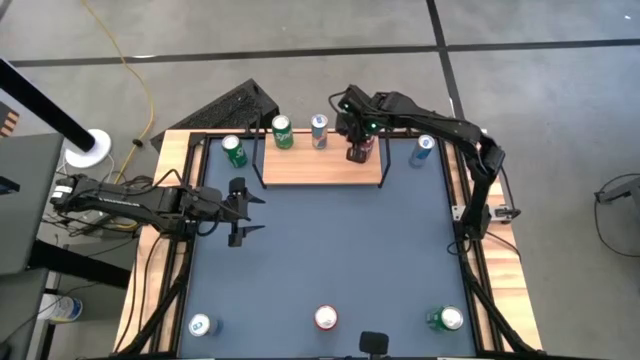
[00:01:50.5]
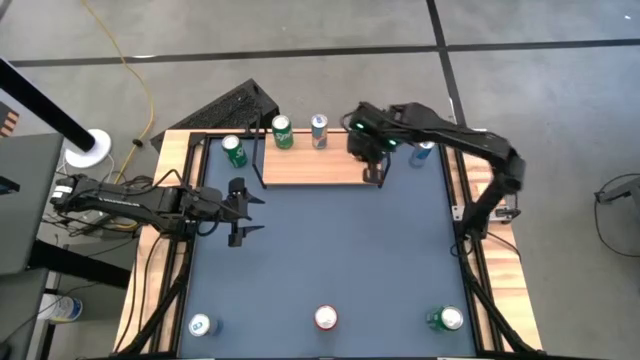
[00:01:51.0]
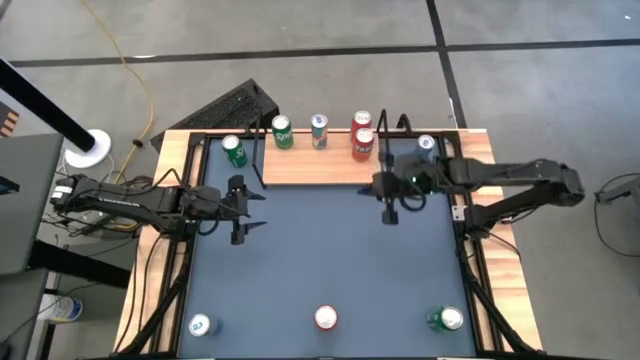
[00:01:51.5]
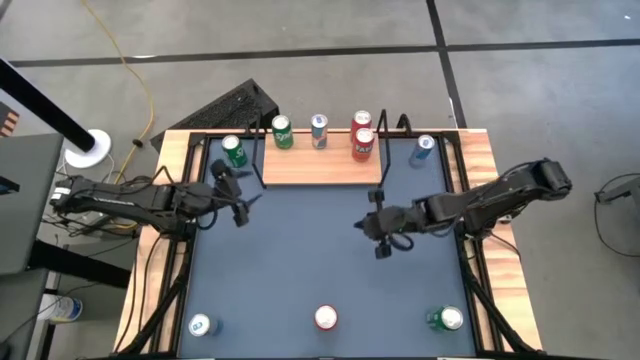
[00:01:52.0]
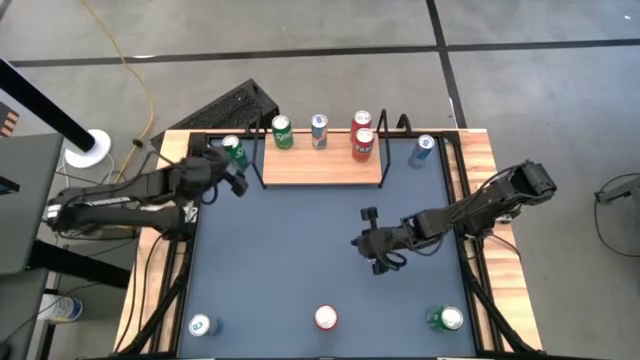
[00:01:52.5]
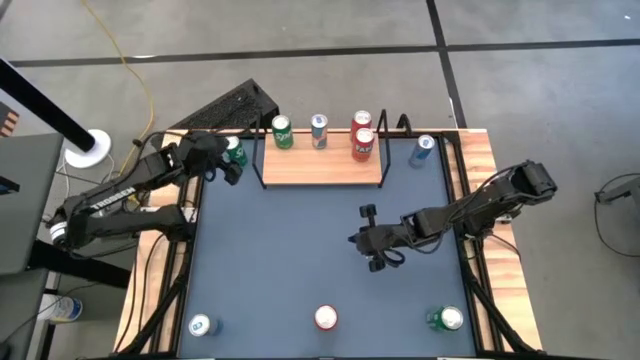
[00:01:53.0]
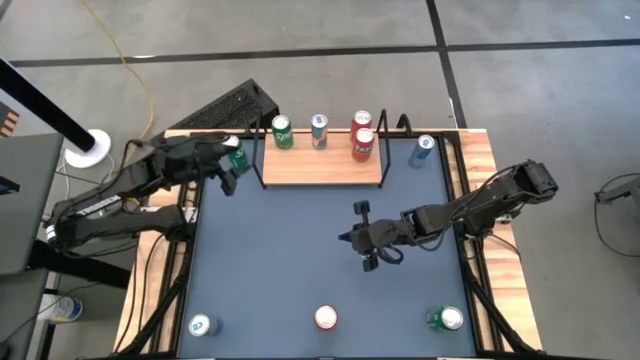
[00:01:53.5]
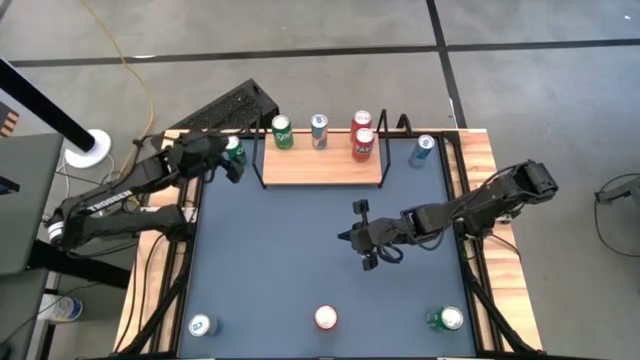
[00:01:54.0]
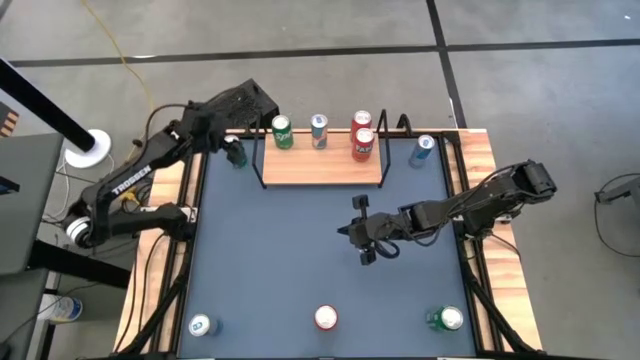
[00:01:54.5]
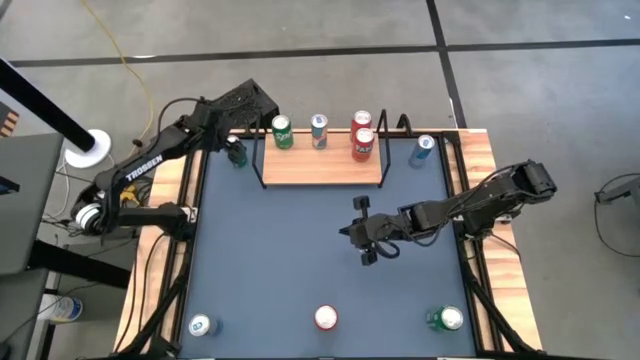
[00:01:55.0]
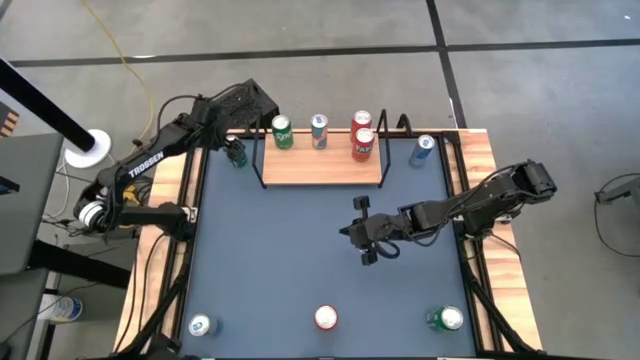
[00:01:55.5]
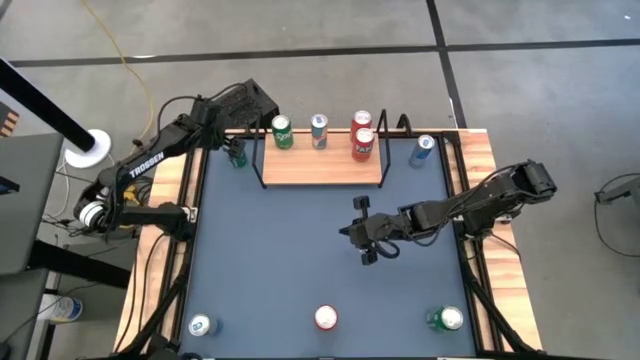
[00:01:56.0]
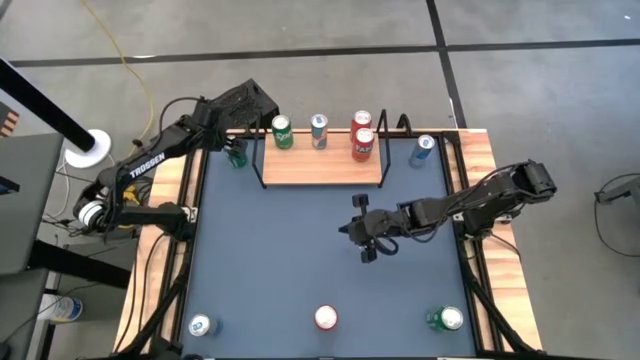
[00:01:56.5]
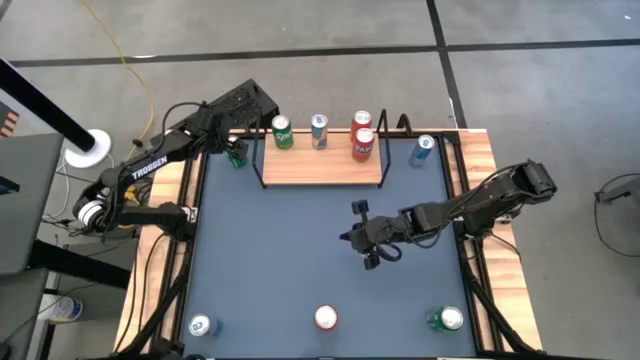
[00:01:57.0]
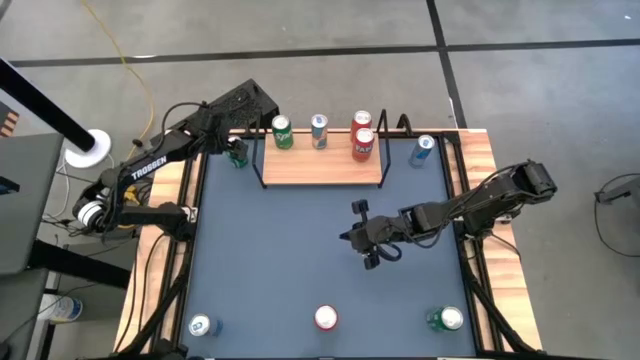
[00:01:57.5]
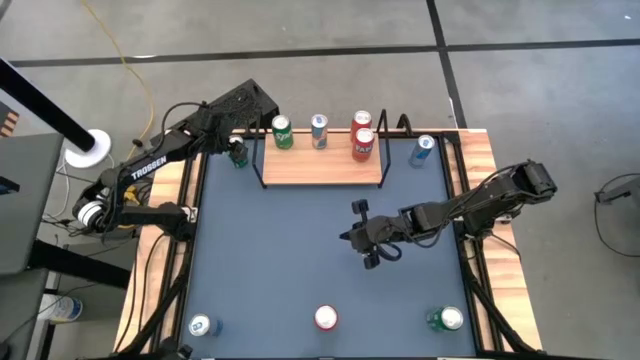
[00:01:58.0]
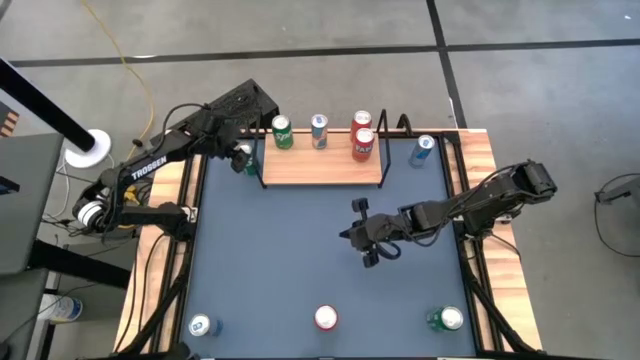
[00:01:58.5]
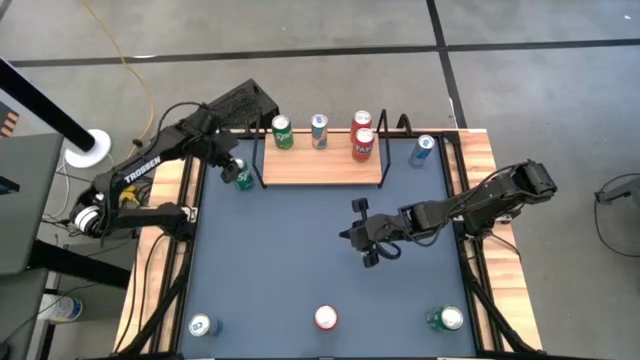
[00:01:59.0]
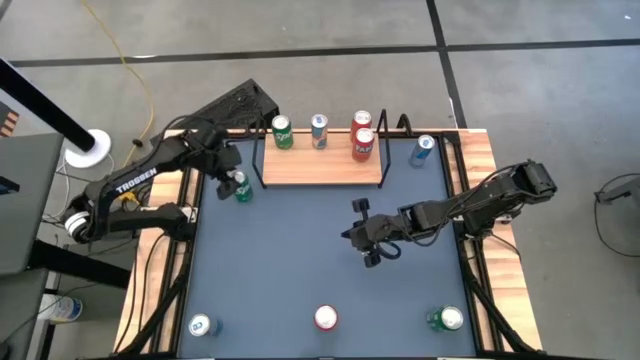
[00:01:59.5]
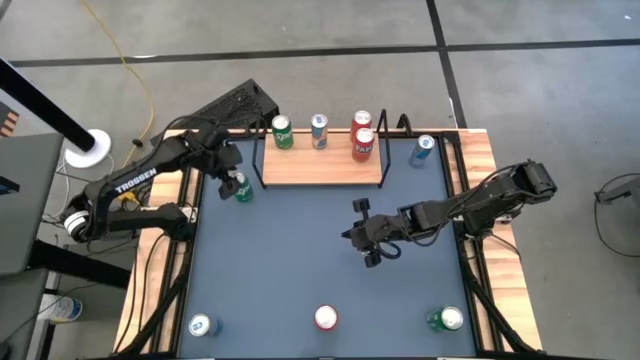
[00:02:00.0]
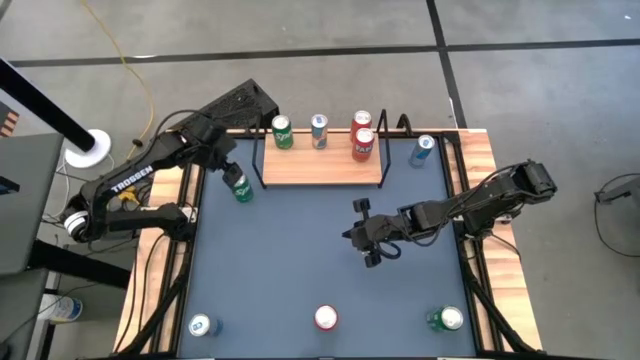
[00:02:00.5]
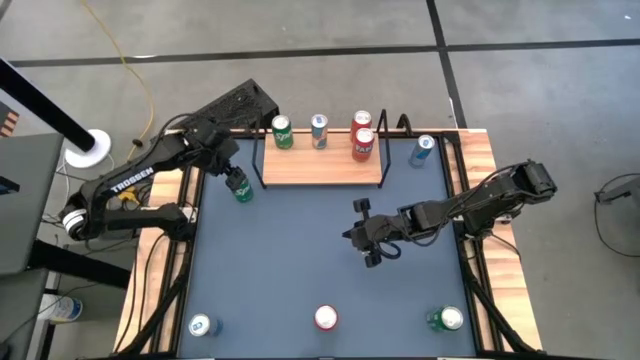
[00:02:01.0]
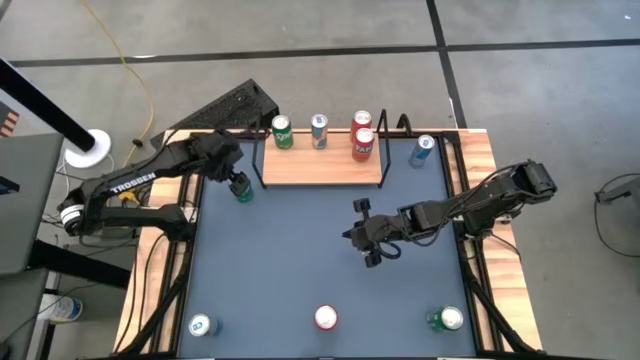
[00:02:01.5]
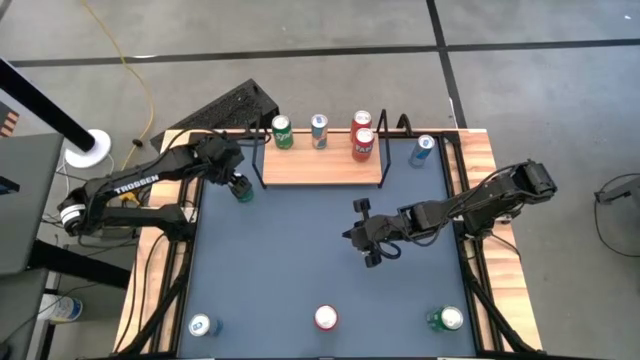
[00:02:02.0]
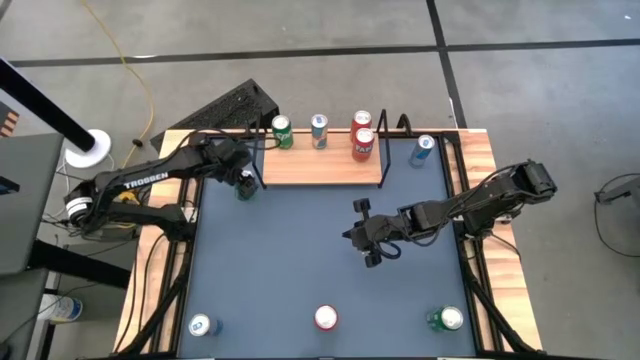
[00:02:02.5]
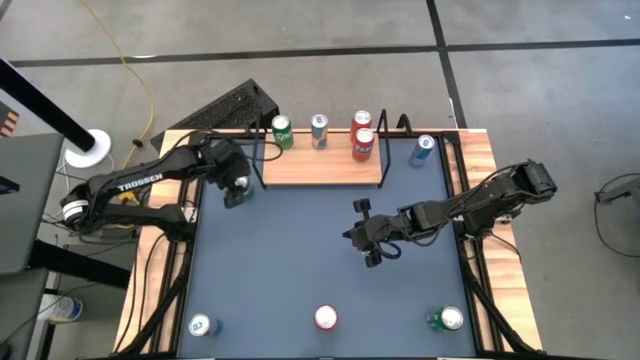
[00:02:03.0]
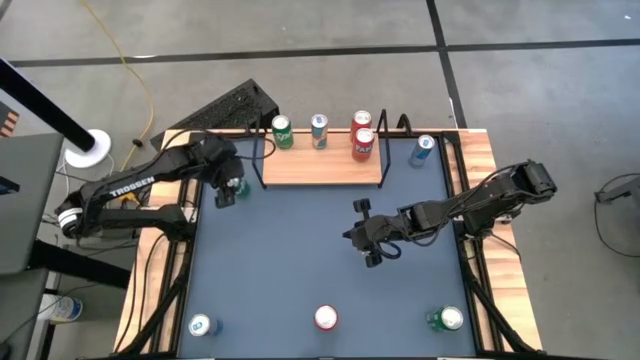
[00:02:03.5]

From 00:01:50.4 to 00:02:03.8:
Task: Place canned beverage on shelf
Put the top green soda can on the shelf aligned with the other green soda can

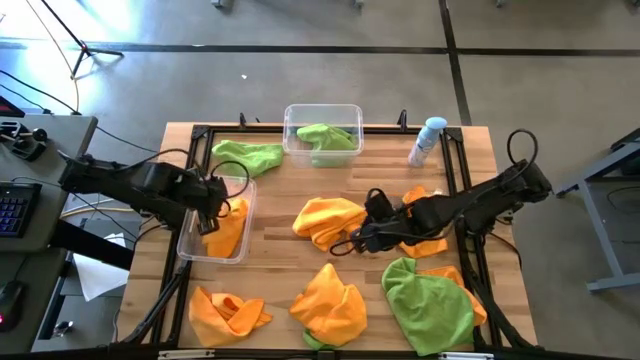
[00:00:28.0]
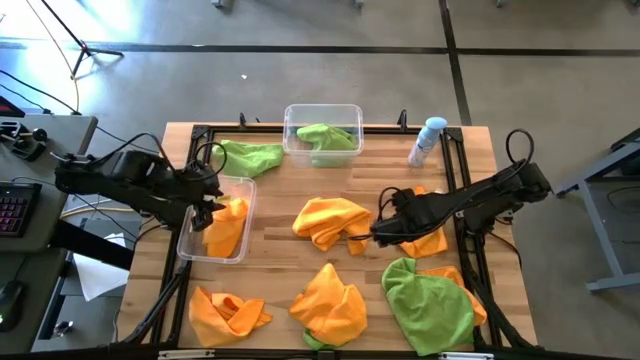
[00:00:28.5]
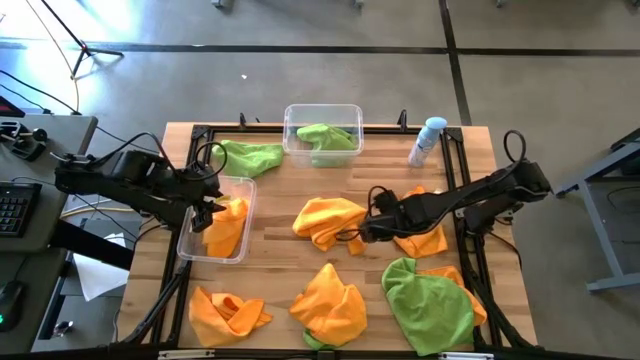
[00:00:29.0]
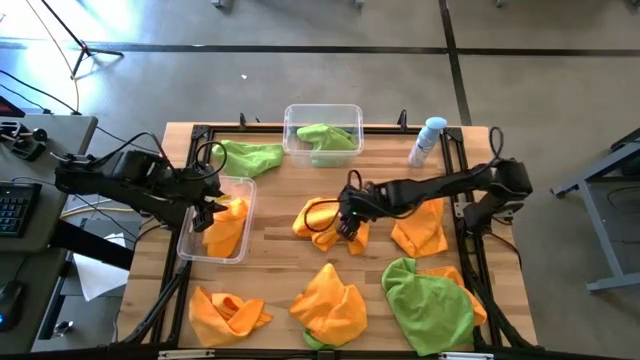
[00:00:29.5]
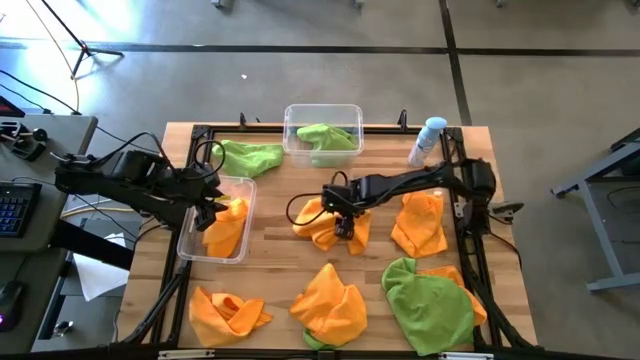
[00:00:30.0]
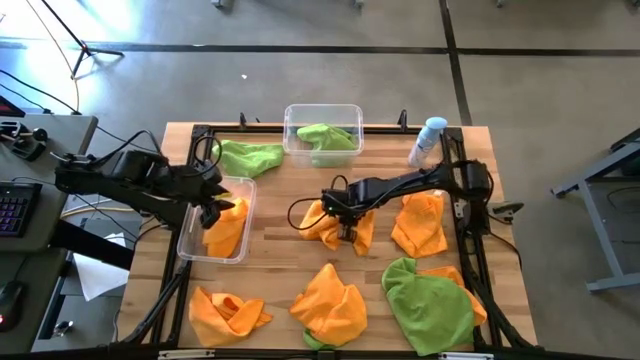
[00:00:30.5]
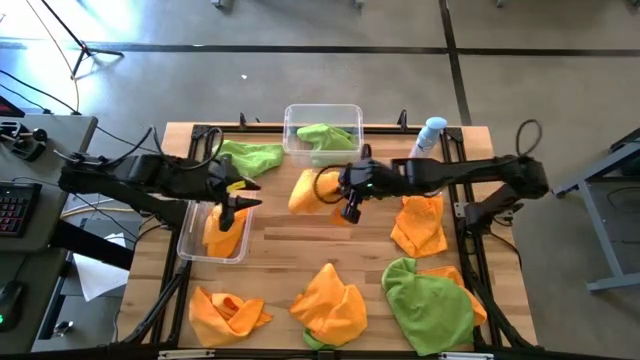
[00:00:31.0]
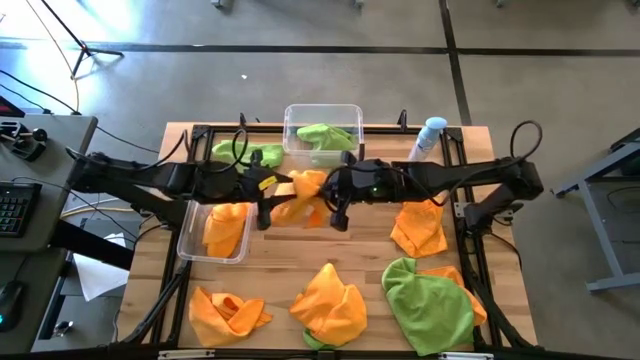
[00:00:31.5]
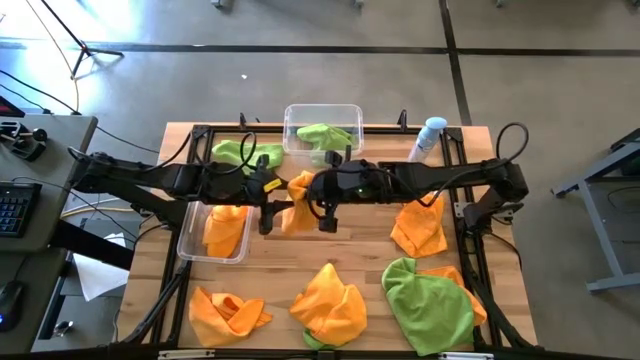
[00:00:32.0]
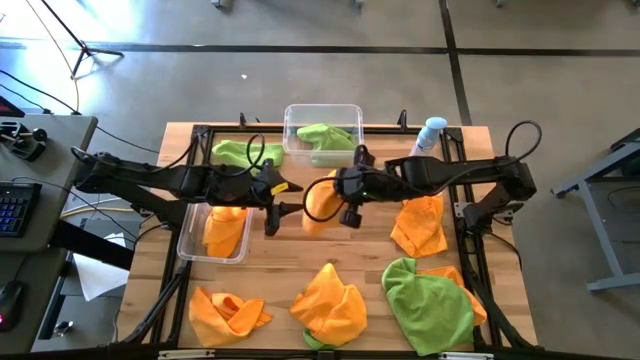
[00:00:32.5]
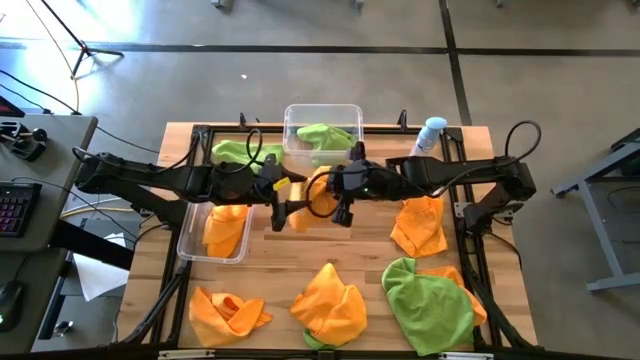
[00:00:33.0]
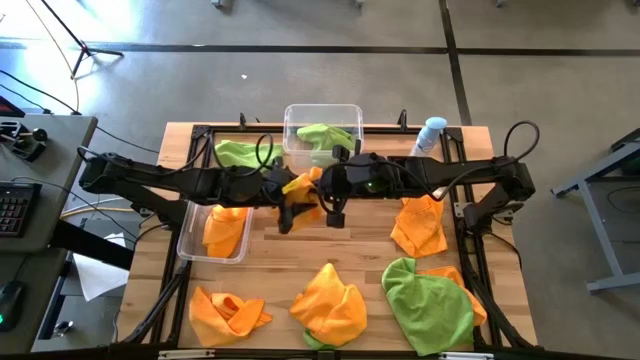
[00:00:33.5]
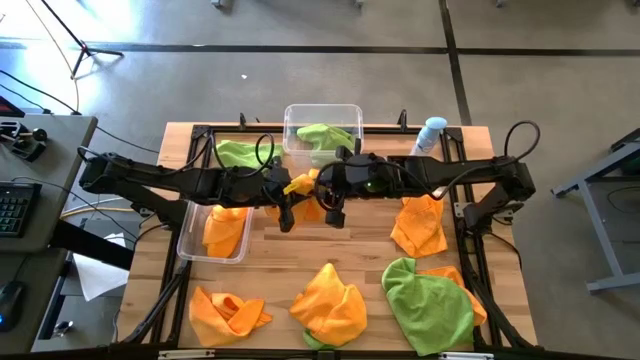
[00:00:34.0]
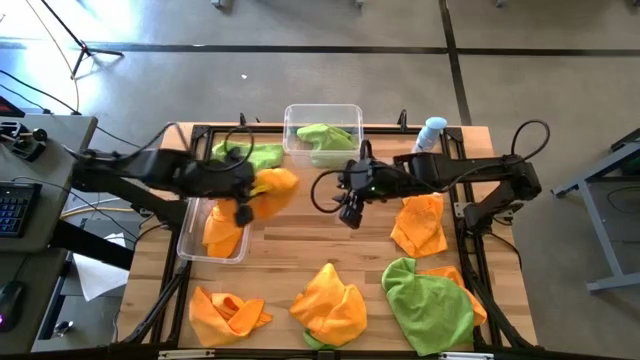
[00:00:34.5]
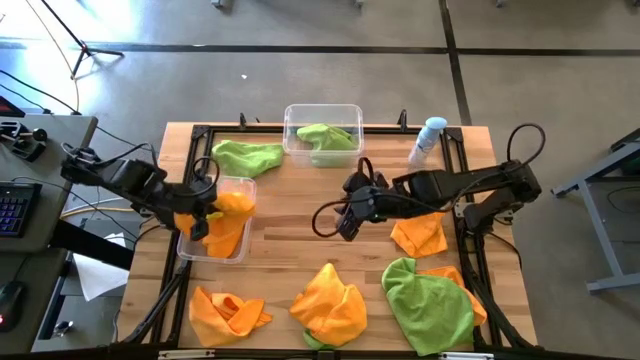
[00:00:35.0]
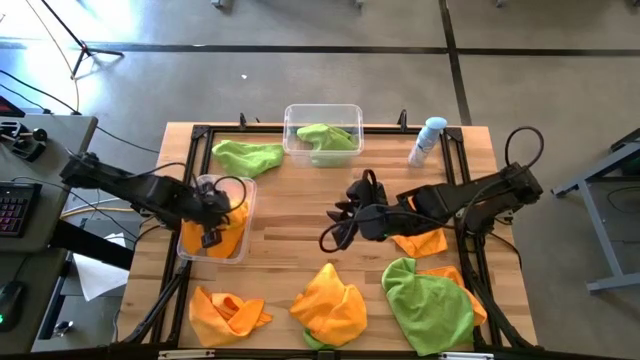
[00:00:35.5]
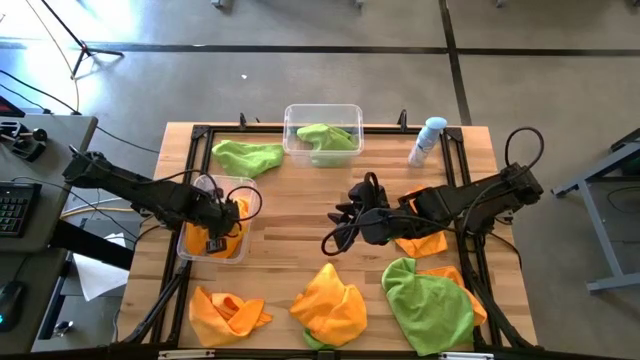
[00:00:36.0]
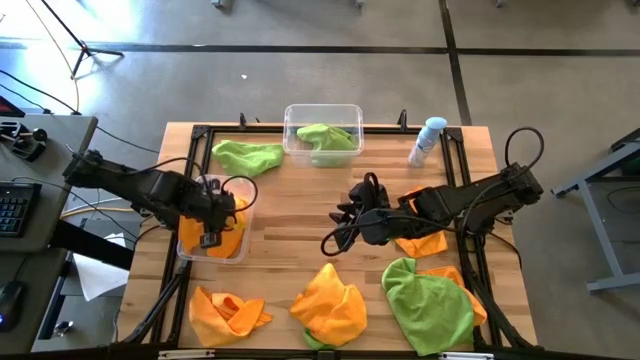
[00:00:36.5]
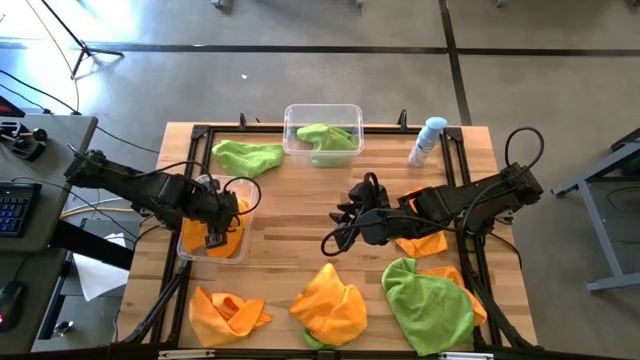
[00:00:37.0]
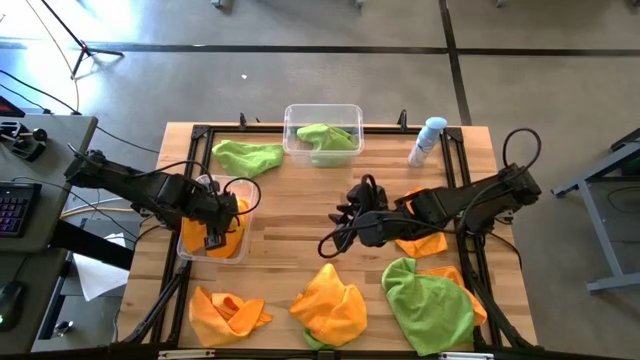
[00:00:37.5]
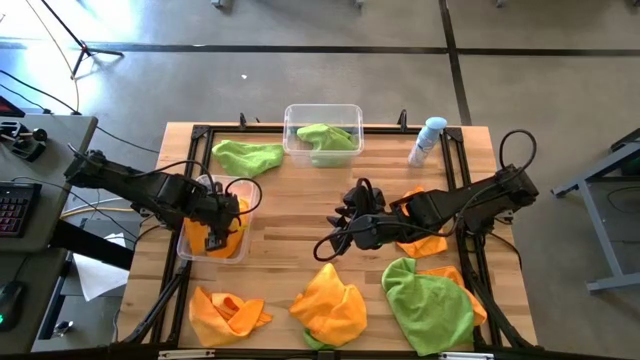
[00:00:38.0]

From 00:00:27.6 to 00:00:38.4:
Task: Sort microfiber towel by color & place in baskets
Put the orange microfiber towel into the transparent bin
